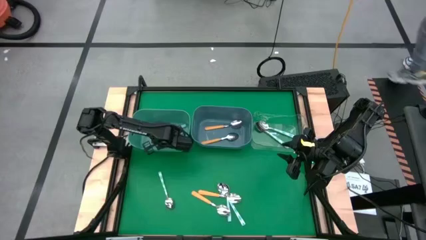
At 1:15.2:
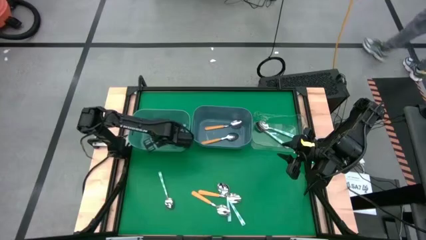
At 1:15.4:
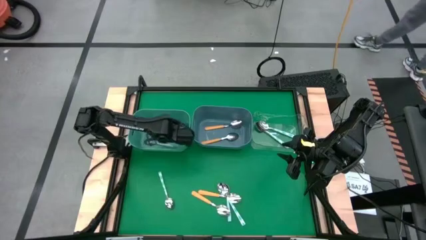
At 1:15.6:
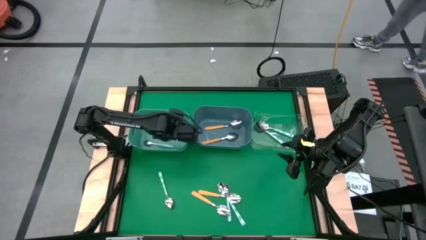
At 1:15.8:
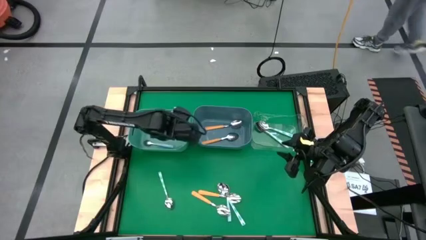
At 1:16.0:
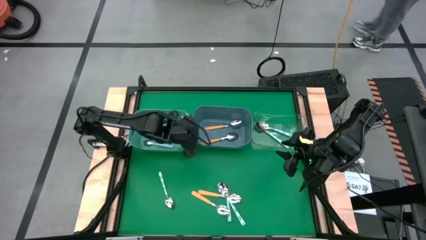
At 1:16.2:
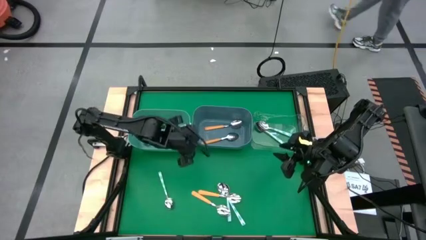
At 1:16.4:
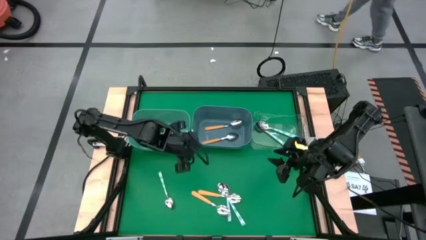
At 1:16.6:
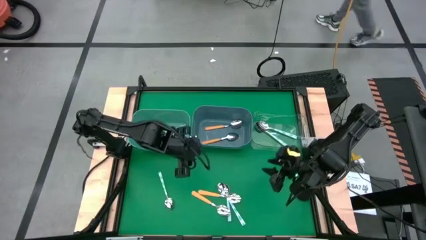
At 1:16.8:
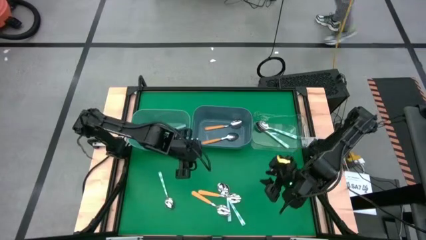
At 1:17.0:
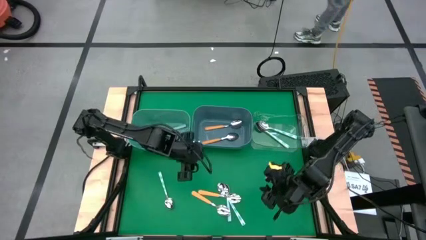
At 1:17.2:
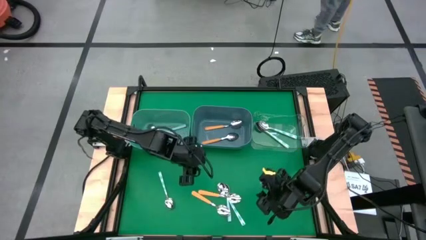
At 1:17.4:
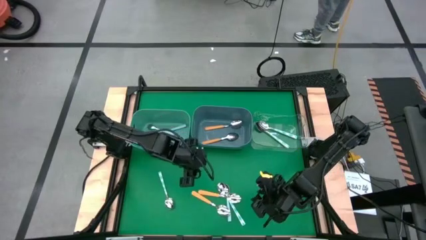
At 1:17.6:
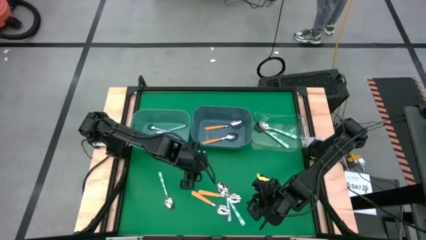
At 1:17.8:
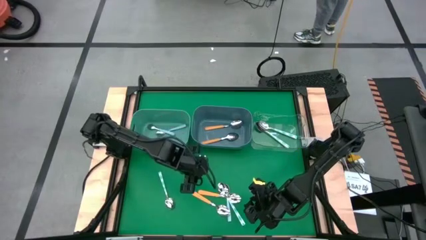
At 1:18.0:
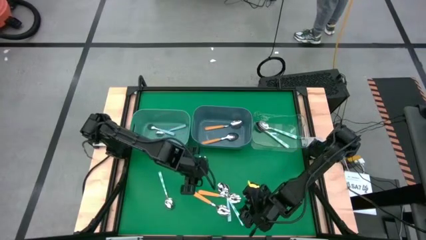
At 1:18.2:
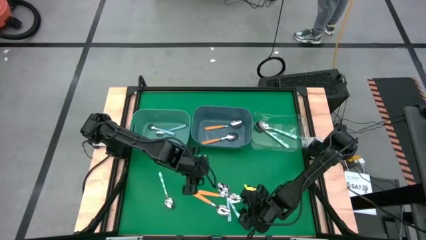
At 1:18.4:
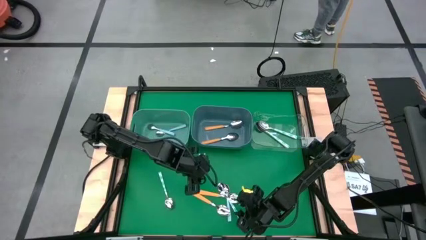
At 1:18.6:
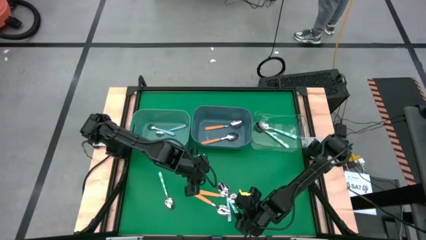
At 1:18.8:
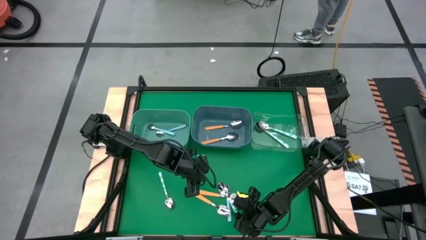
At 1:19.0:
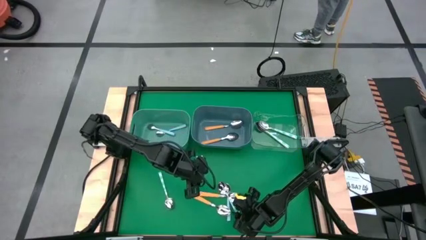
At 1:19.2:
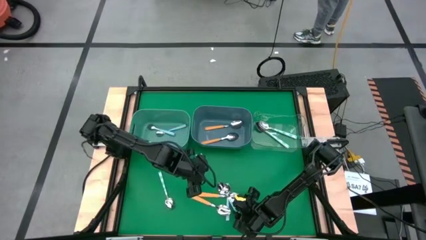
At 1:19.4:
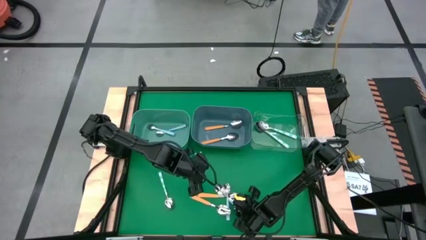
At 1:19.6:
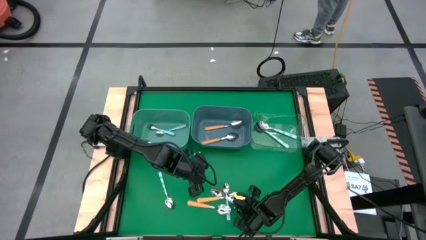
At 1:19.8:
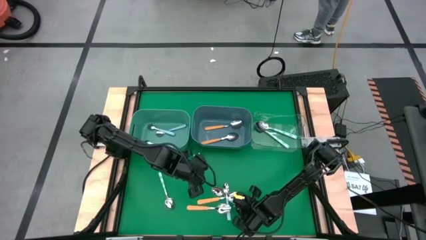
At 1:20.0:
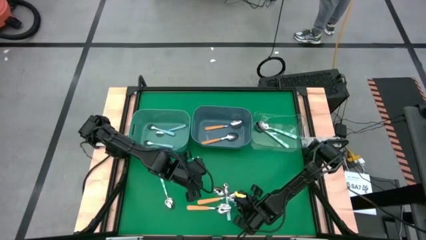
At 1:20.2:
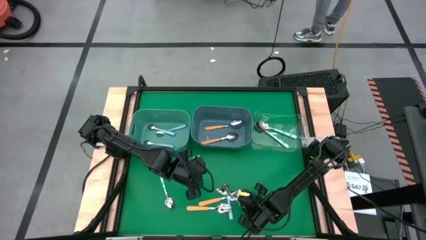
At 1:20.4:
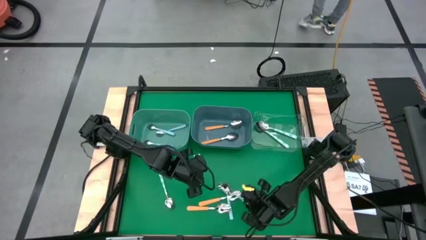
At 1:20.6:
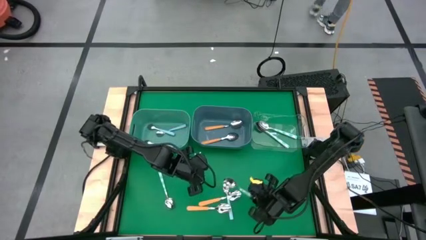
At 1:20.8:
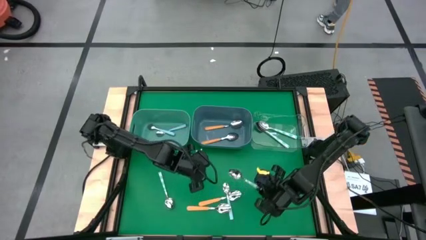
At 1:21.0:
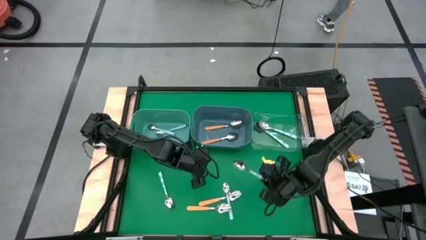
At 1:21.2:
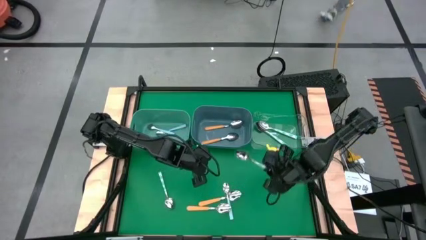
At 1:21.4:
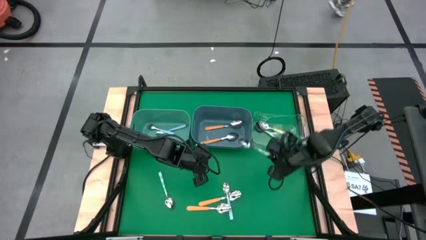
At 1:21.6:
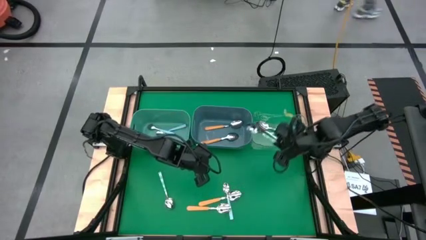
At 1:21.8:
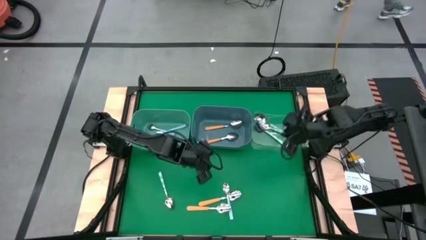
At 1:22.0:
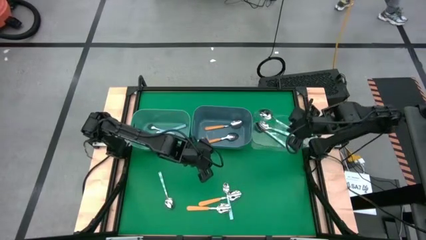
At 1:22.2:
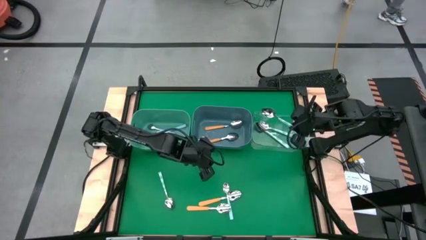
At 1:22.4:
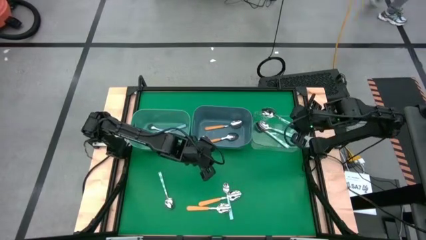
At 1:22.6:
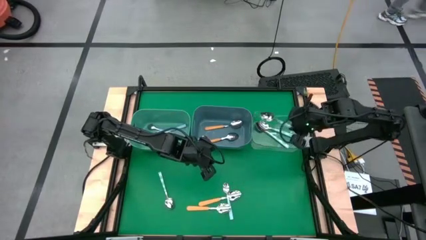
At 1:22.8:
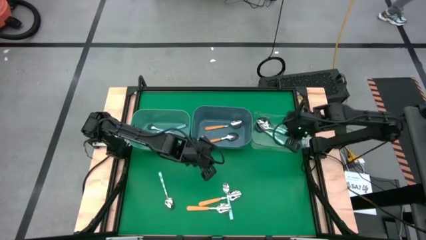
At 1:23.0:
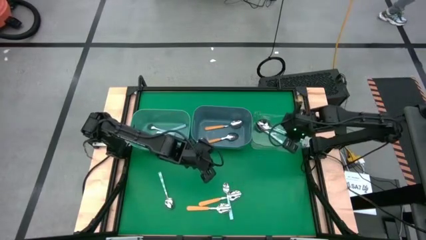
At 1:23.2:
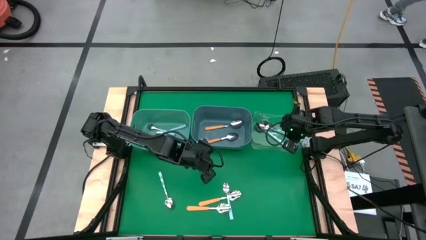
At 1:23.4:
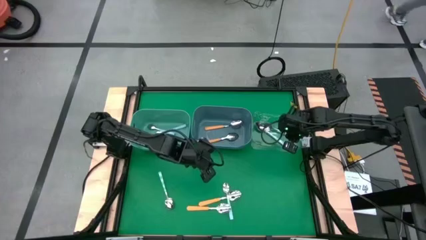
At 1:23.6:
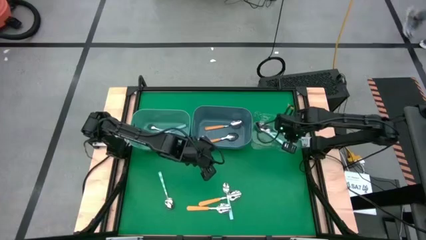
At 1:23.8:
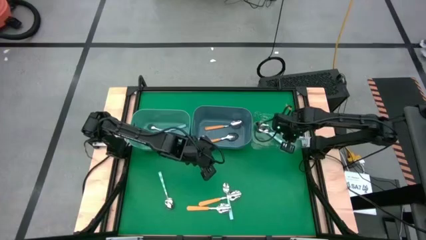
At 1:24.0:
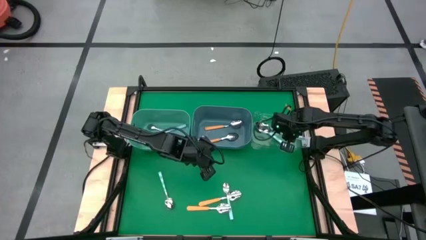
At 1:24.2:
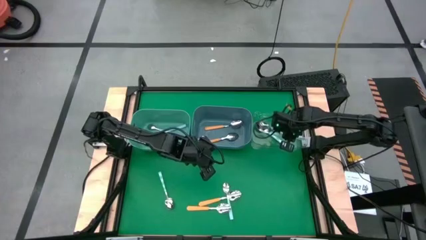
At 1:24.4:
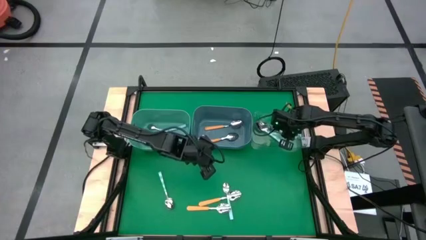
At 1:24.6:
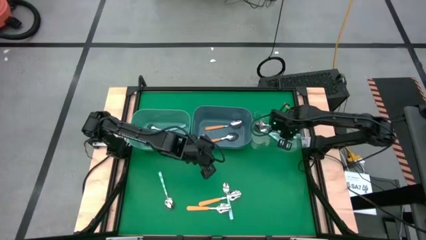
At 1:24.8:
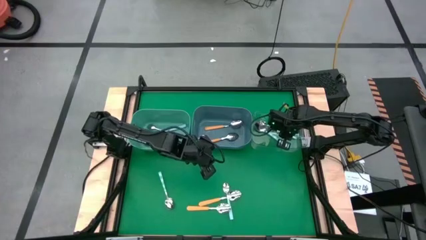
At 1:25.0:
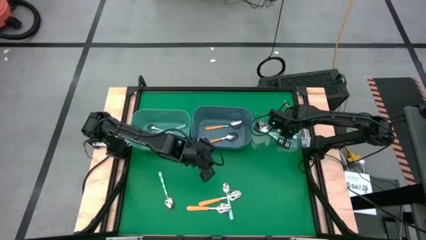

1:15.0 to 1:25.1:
Task: Sort silverware by color (type)
Put the white spoon into the transparent bin

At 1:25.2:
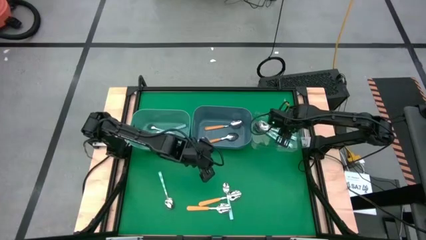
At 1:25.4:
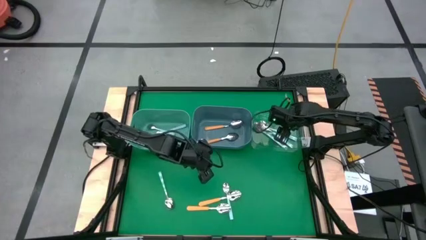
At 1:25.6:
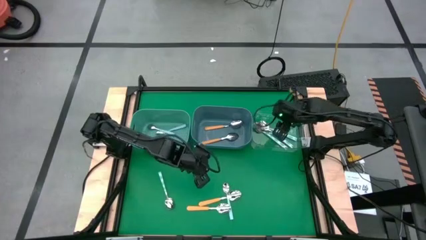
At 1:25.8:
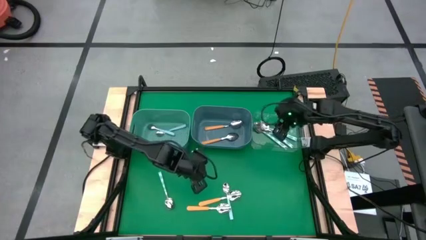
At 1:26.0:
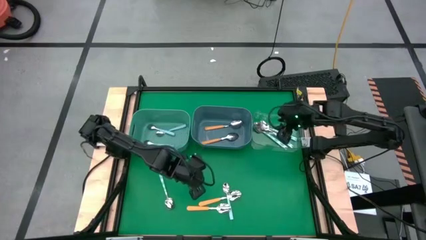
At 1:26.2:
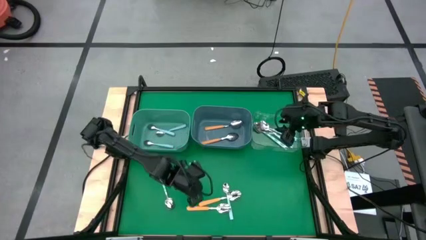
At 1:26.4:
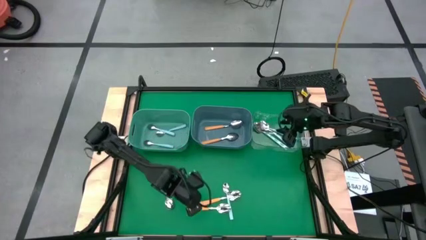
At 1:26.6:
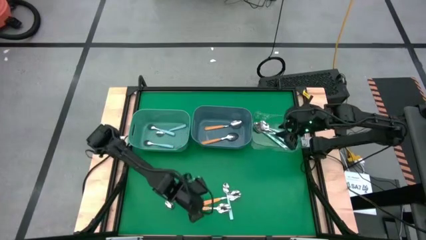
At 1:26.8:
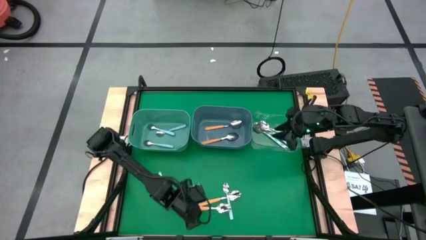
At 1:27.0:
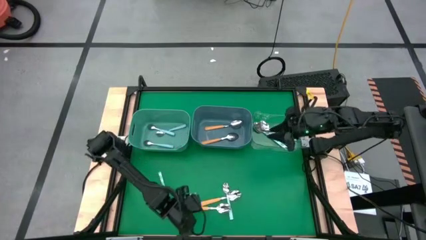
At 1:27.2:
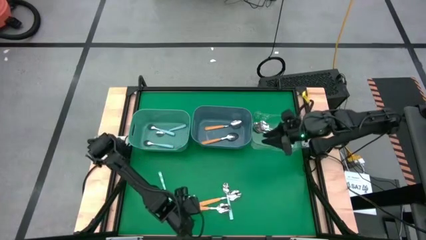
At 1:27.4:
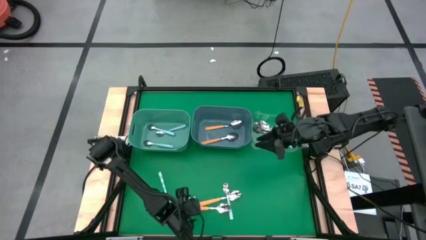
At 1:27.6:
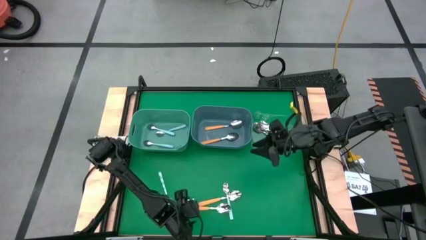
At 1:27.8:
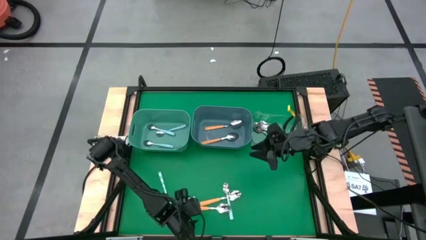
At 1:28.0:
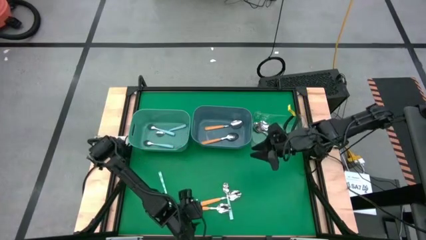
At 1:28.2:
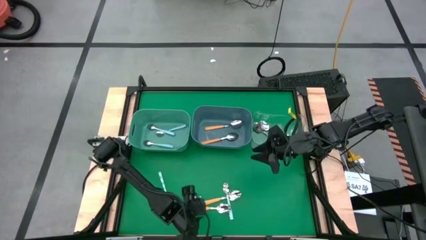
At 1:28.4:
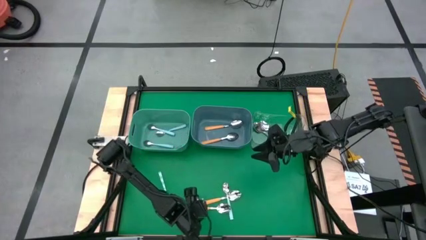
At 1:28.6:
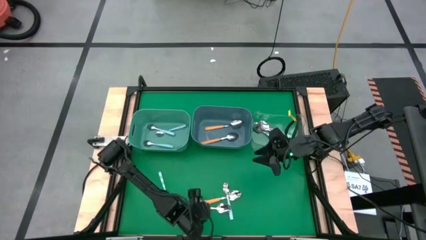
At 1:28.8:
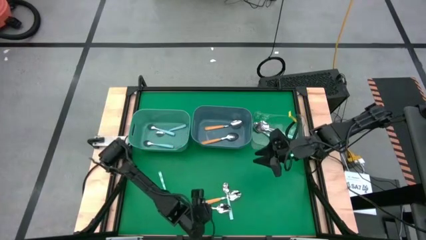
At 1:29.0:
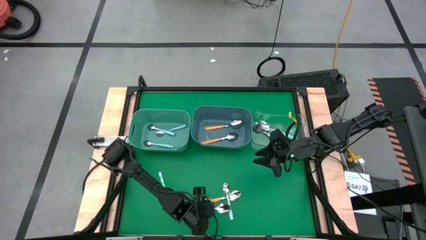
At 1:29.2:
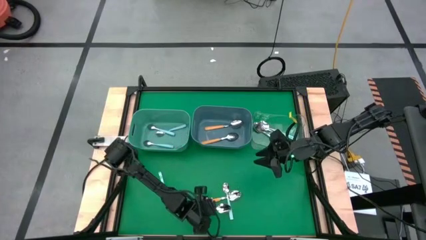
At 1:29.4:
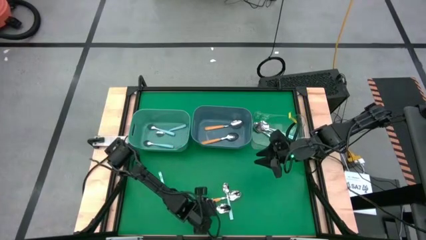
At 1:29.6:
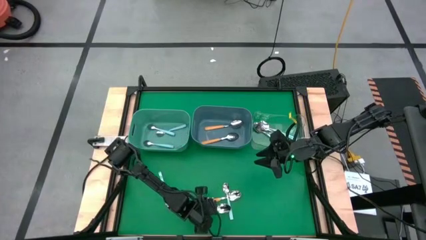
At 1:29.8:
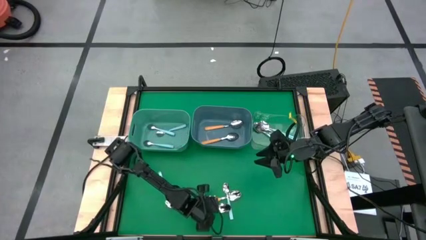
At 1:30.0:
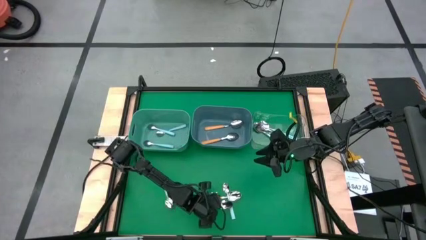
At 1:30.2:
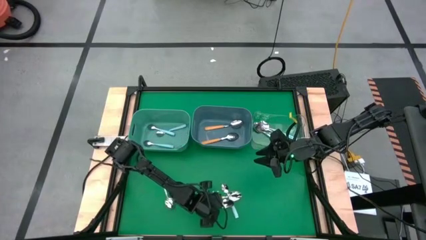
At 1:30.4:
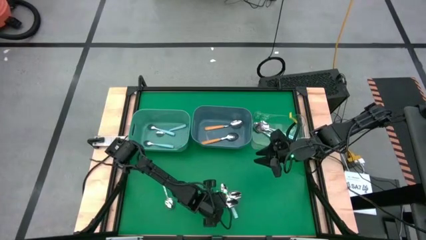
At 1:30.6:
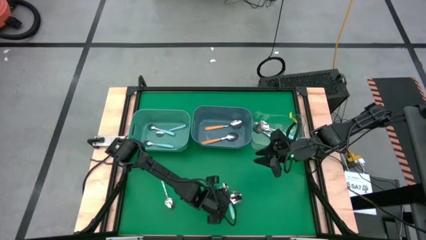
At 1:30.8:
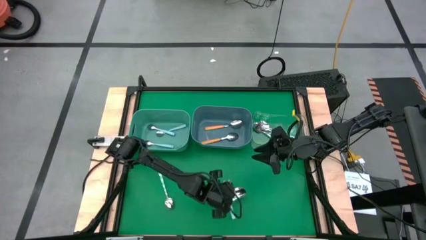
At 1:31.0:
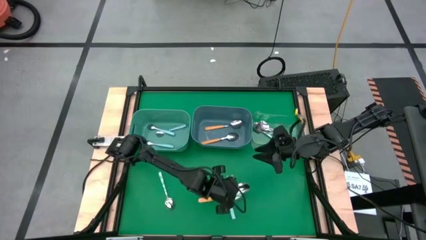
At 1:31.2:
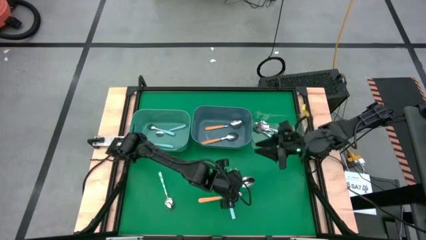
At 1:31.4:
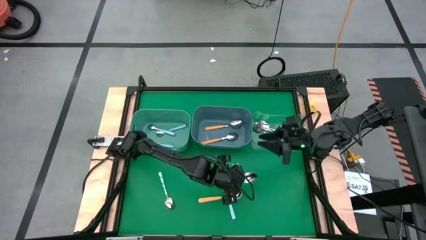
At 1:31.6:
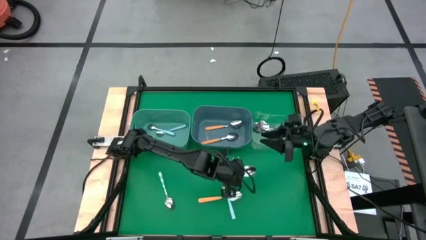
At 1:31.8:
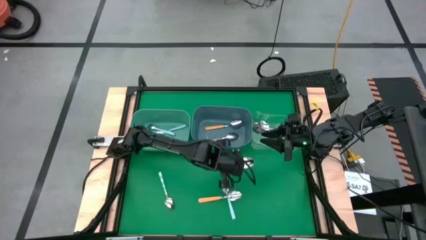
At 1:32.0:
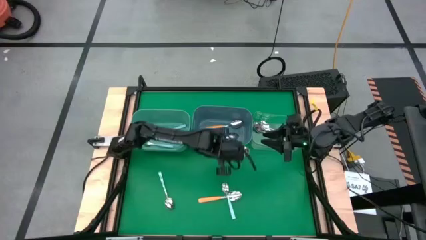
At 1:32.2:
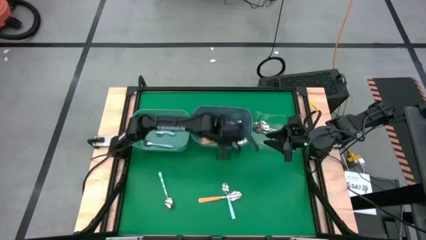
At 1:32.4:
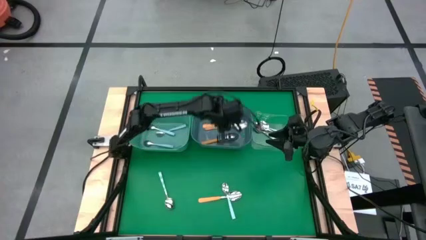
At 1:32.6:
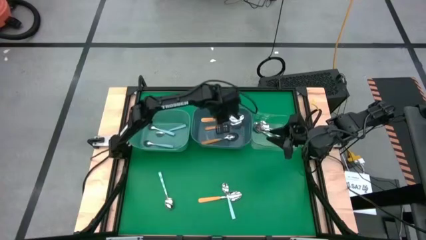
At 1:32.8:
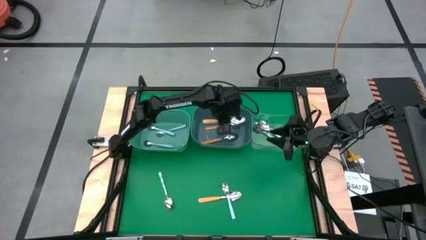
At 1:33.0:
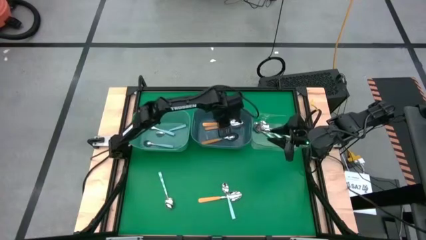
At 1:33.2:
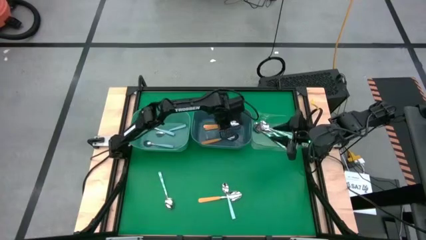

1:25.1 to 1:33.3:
Put the orange spoon into the blue bin
